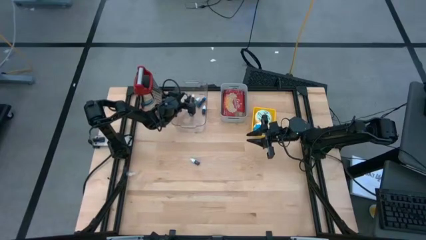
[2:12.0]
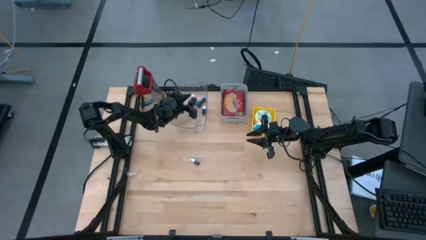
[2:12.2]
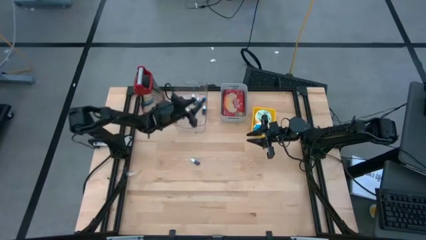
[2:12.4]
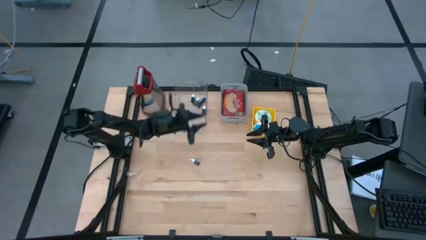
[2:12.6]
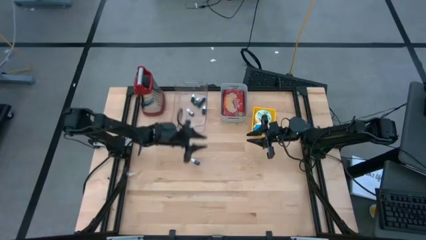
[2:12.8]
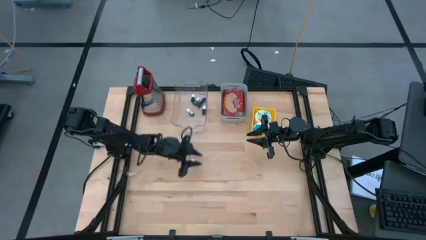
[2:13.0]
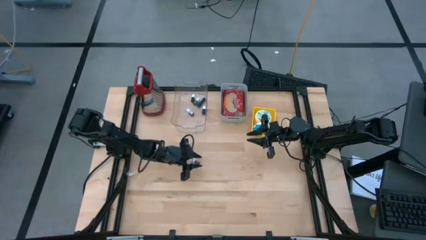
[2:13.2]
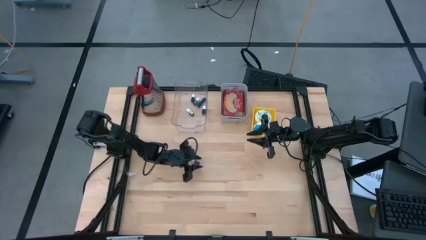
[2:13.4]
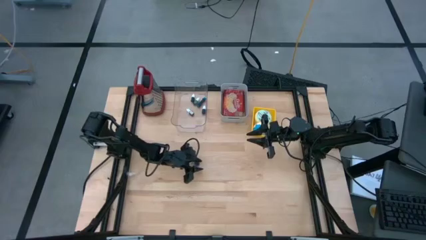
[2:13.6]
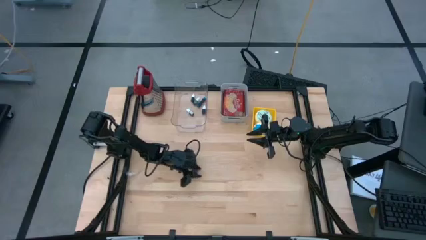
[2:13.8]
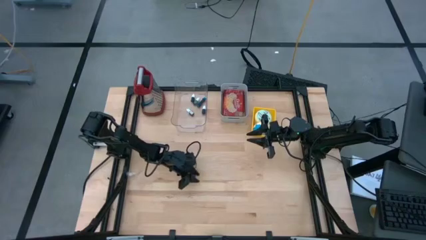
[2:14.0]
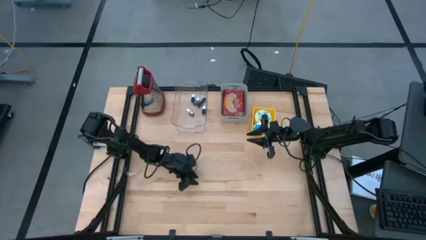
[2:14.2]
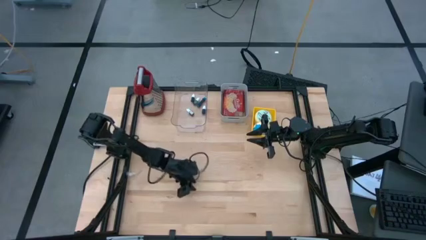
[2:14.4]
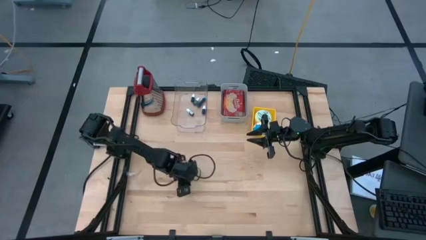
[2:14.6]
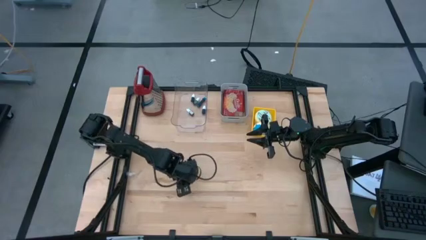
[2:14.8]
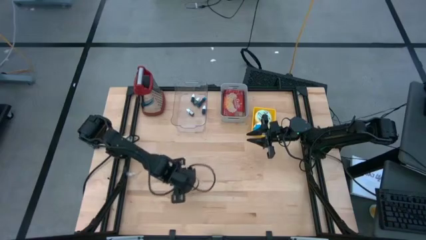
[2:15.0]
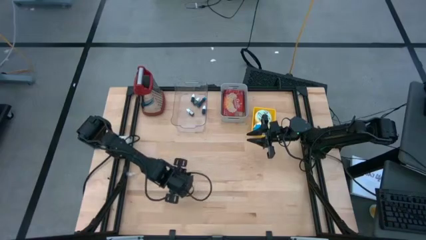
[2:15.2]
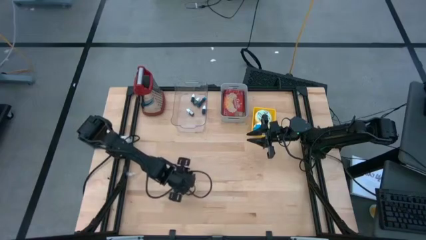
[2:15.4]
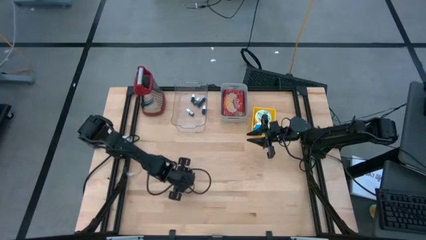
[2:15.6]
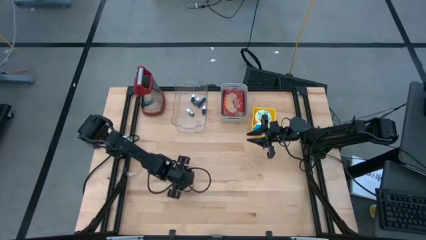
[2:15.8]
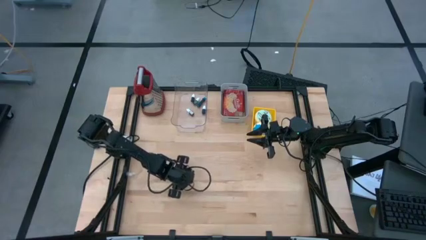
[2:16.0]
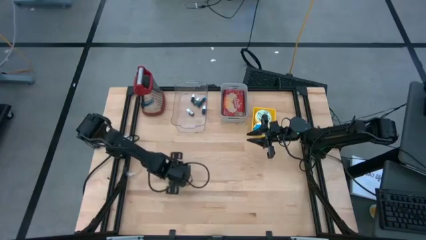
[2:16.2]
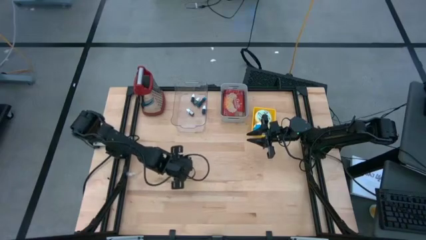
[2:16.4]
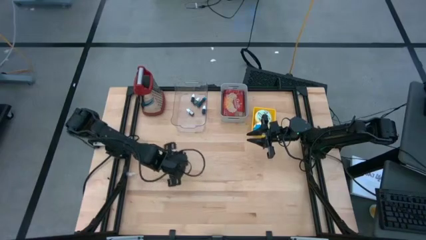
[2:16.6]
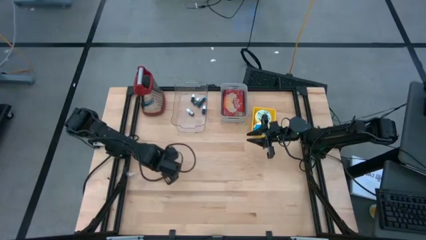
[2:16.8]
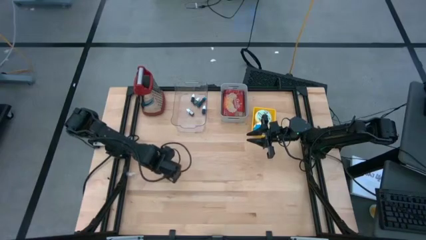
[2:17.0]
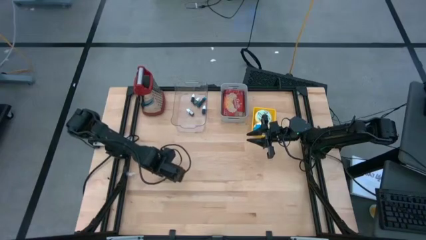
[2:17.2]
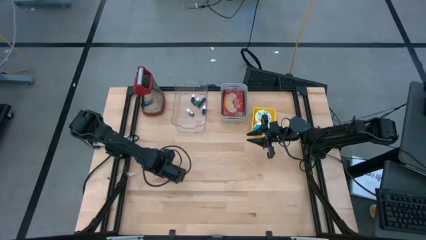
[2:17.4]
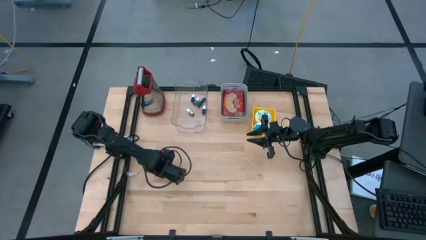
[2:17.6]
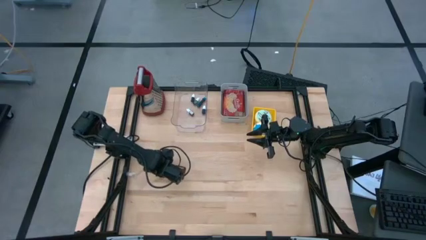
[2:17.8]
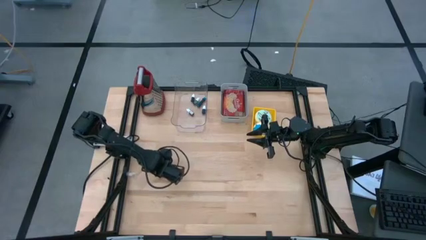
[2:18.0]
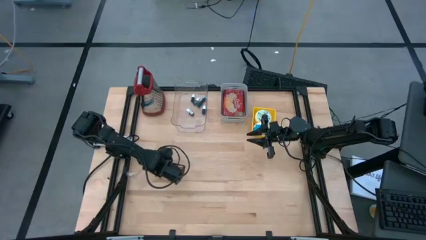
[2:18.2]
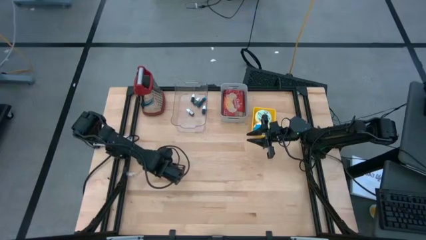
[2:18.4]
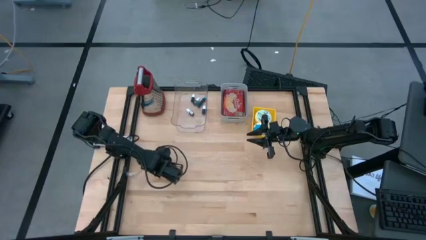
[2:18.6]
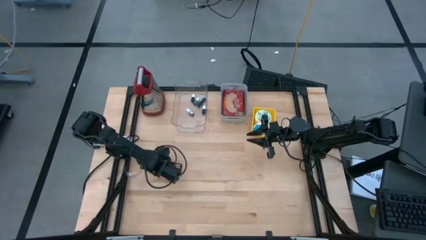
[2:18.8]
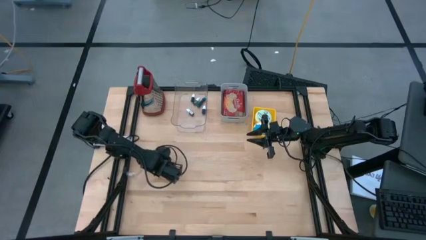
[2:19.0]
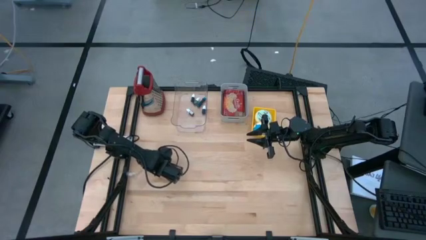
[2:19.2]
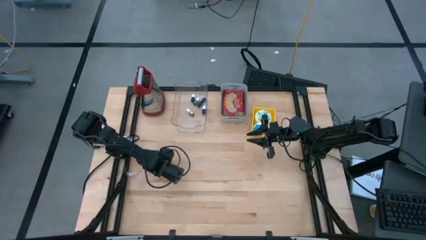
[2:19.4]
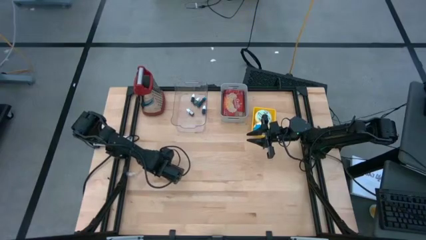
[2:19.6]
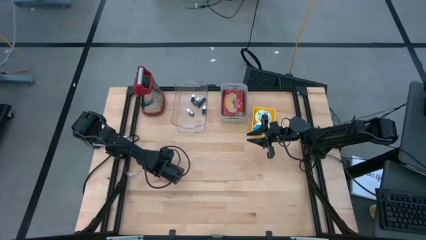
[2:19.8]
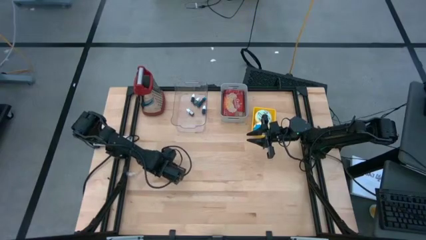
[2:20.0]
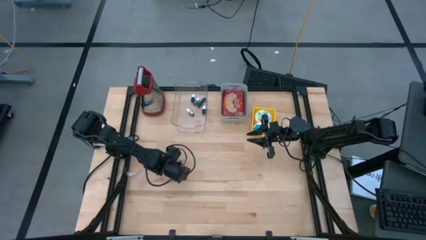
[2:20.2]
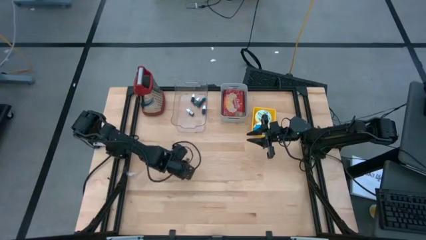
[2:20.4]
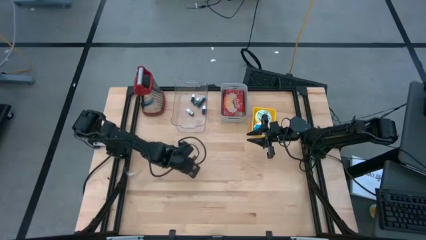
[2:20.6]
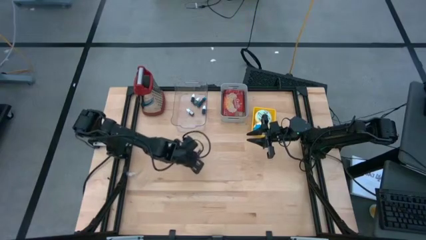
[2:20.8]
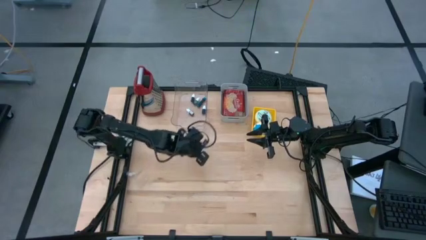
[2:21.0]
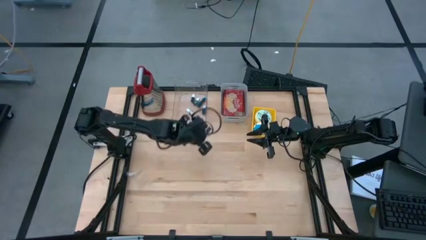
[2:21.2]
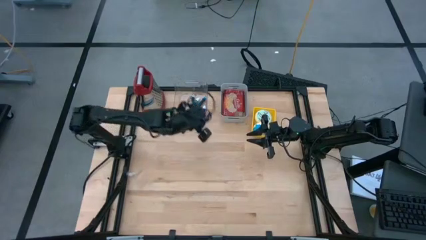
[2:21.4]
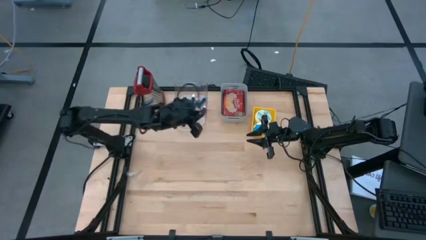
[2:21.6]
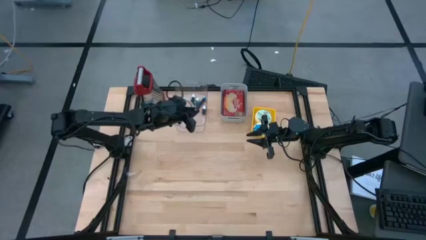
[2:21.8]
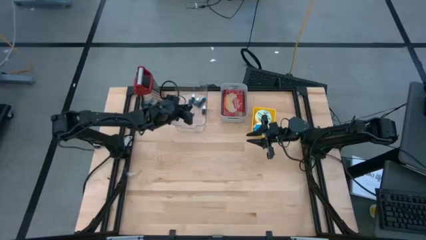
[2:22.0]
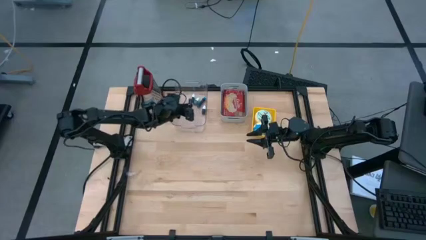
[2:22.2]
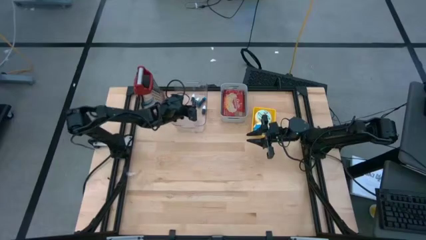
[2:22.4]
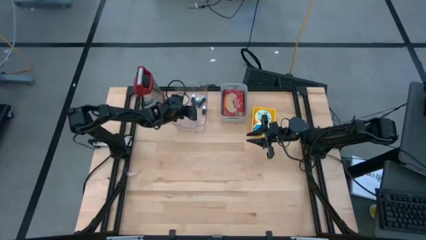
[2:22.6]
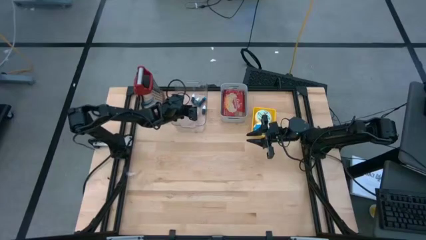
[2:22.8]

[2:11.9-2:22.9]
Task: Pick & Place Food Item
Put the purple food coloring into the transparent bin

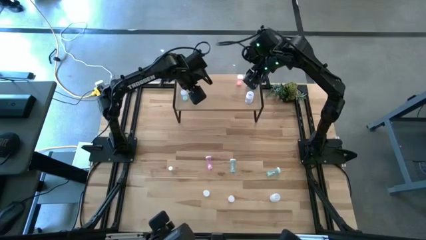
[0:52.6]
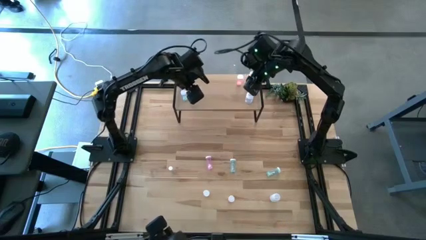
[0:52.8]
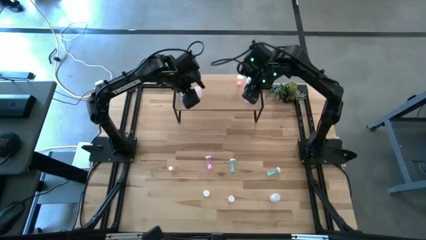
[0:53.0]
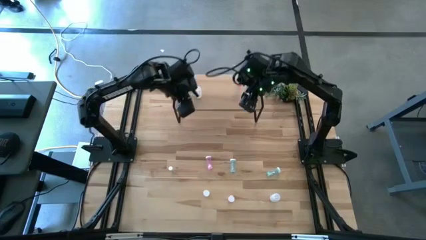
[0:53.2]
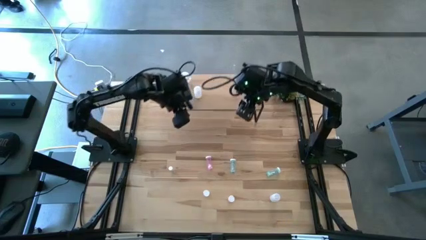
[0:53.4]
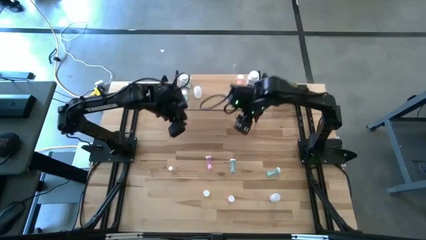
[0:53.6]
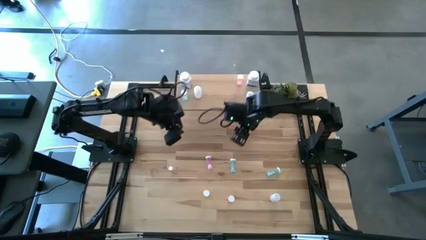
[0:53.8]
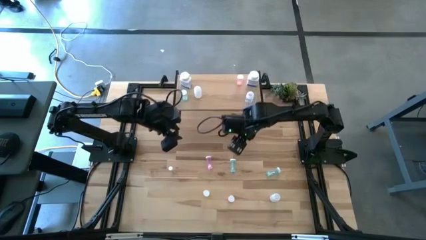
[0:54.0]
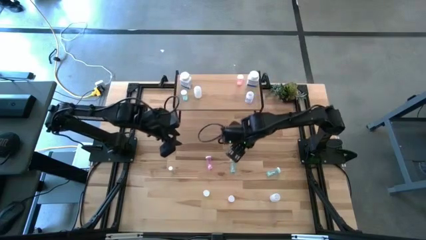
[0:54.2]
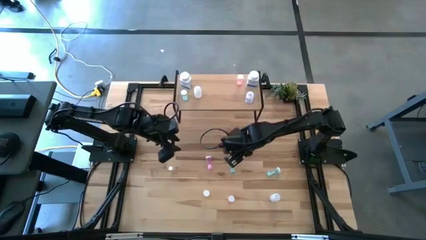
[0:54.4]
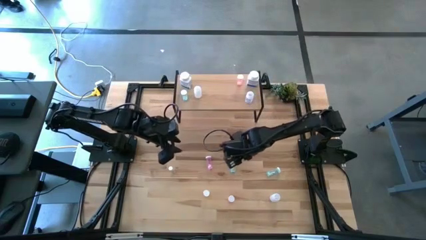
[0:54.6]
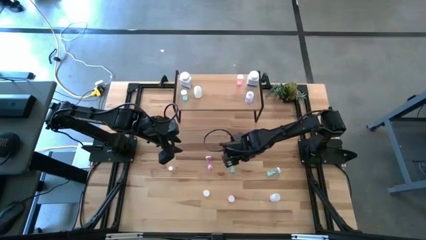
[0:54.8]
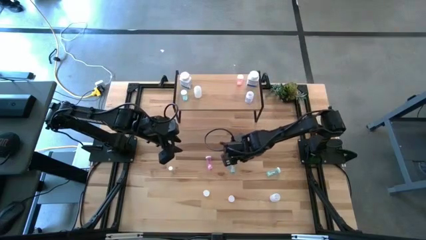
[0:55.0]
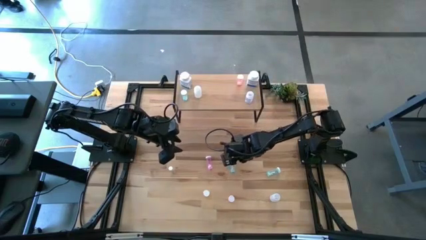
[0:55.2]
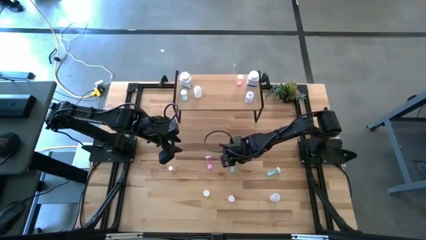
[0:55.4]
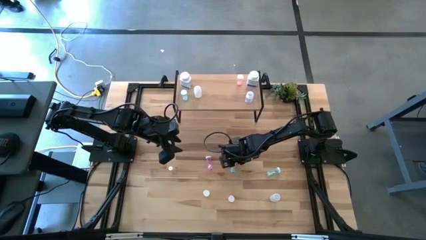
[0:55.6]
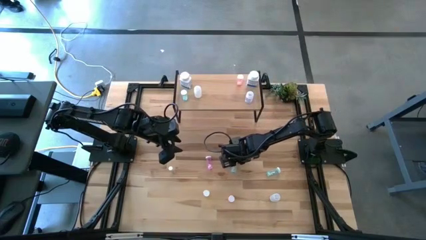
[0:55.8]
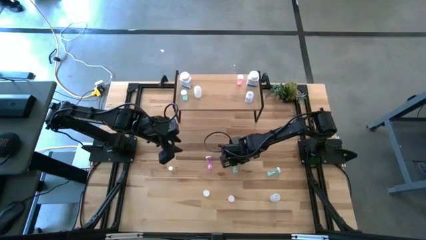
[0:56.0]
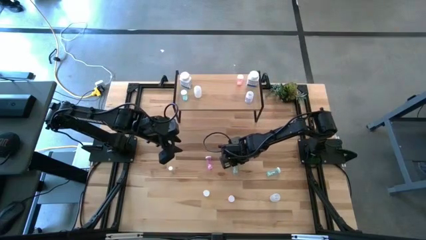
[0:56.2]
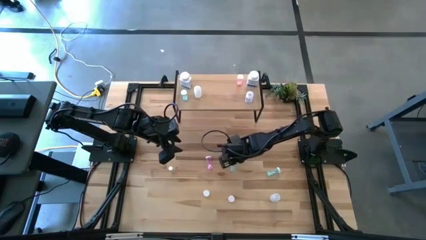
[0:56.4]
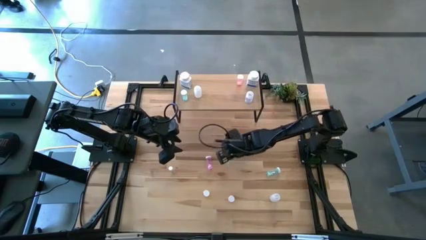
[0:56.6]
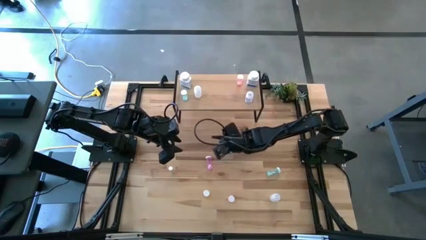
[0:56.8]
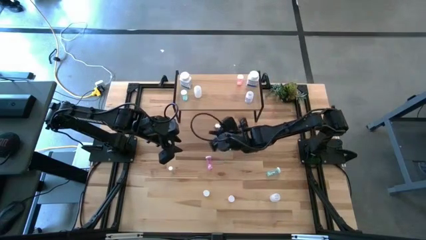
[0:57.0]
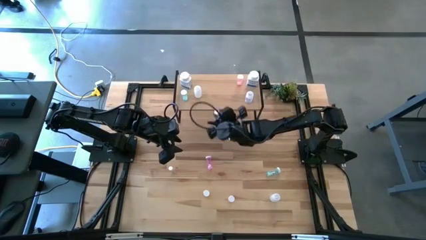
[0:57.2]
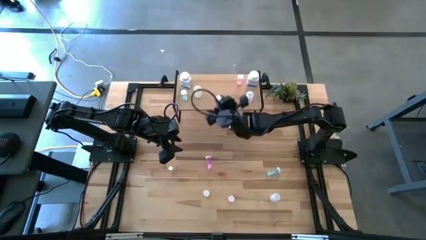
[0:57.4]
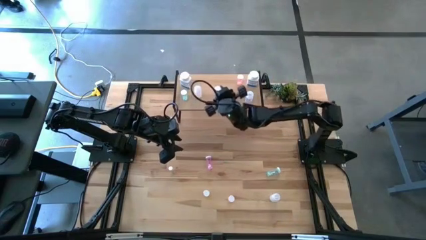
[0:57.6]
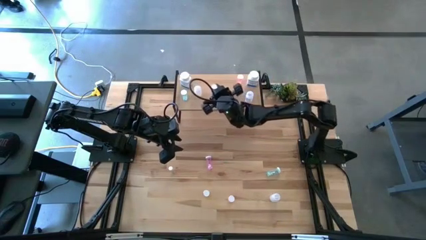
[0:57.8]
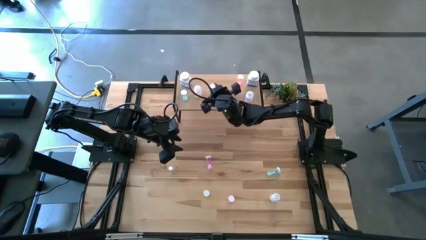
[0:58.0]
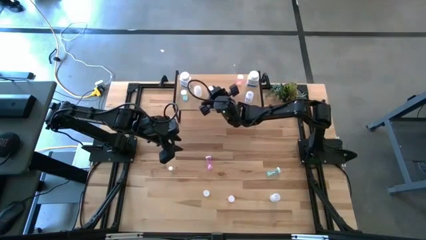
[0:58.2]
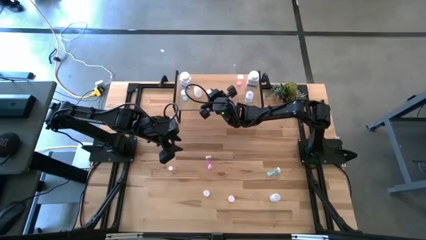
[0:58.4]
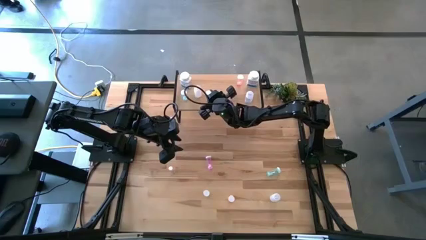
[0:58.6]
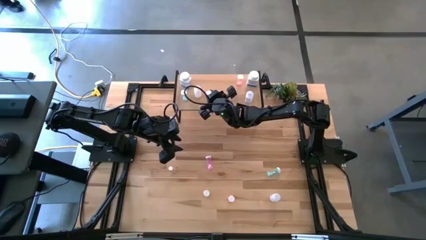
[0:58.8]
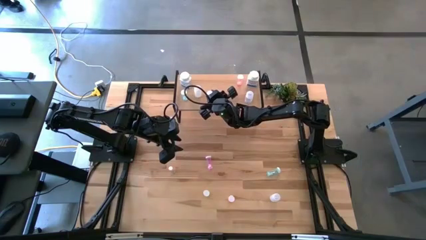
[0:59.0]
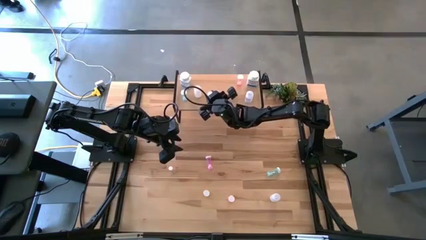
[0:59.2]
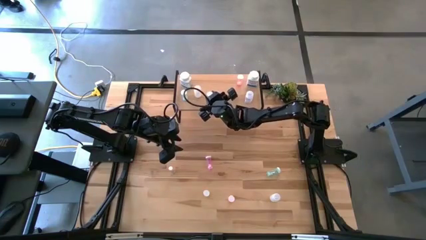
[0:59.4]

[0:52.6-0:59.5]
Task: Pick and place medicine bottles onto shelf by color
Put the left light blue medicine bottle on the shelf
